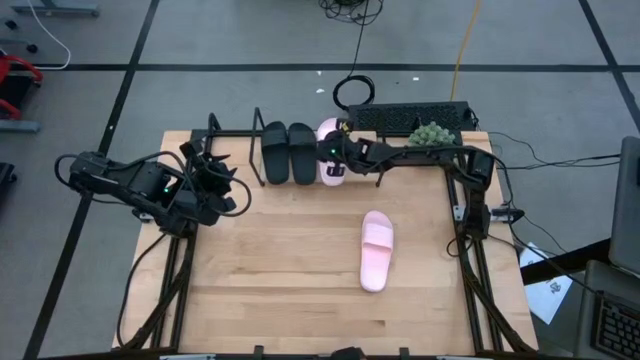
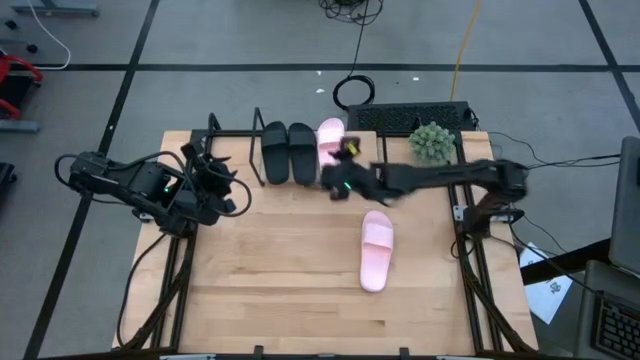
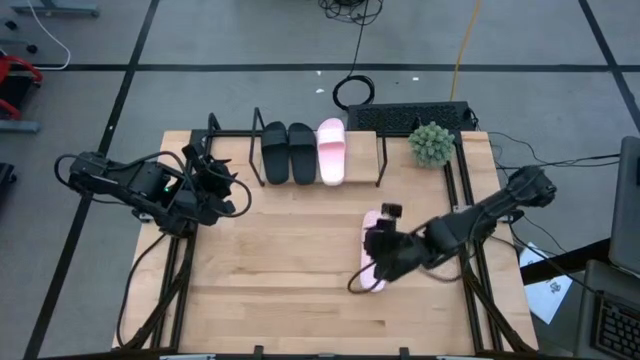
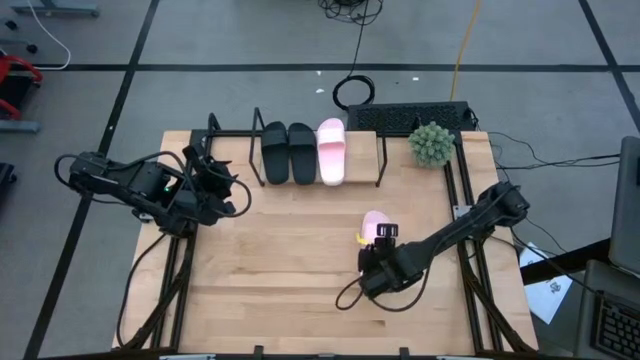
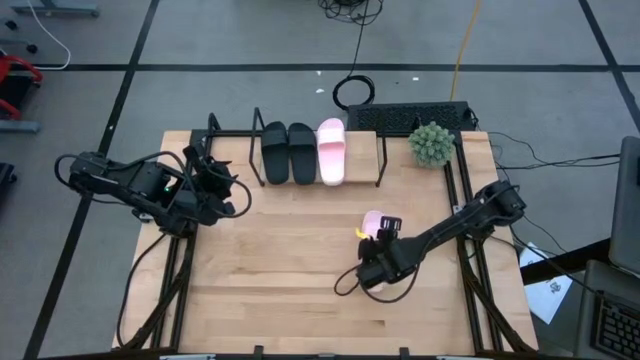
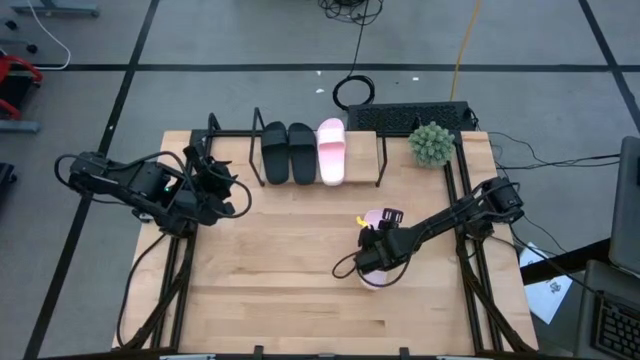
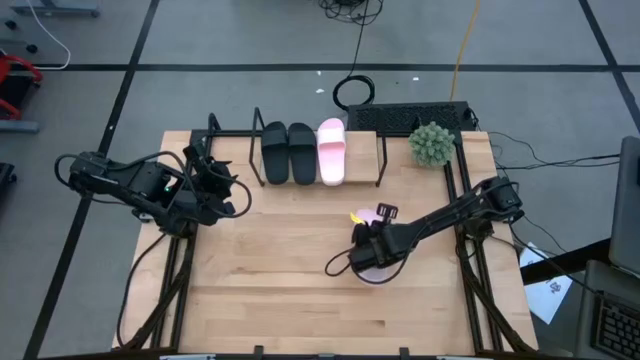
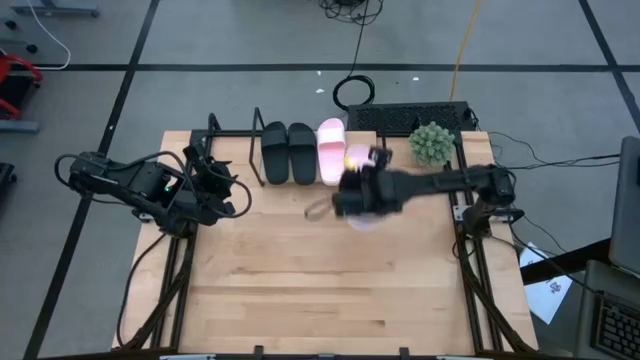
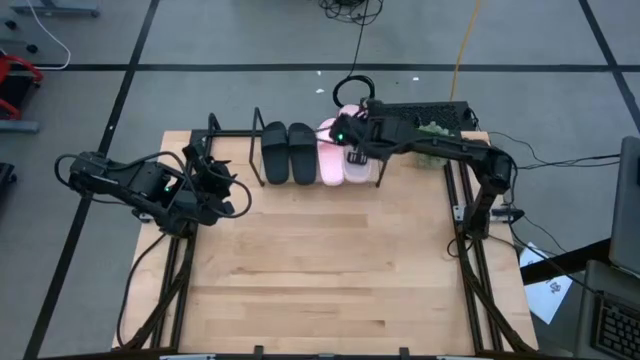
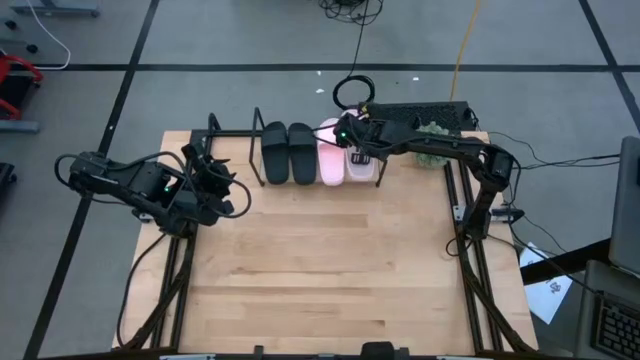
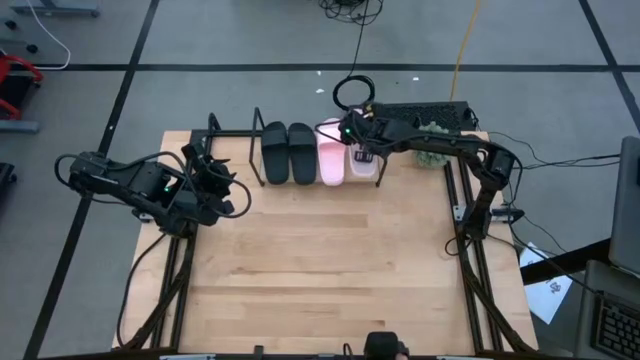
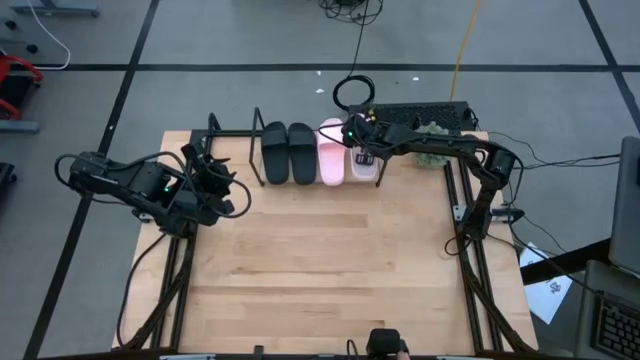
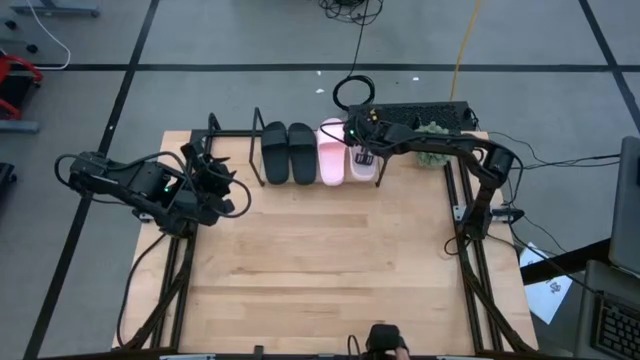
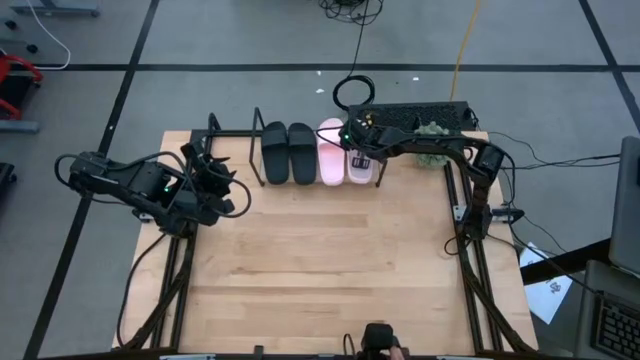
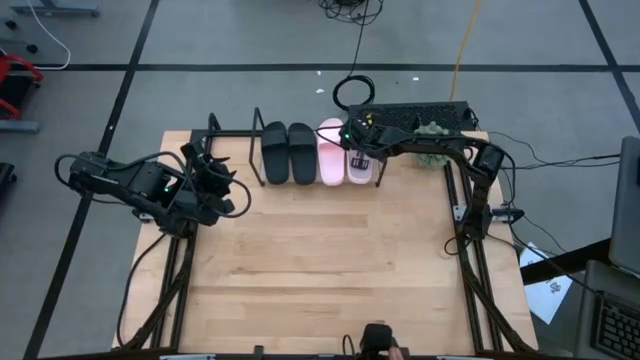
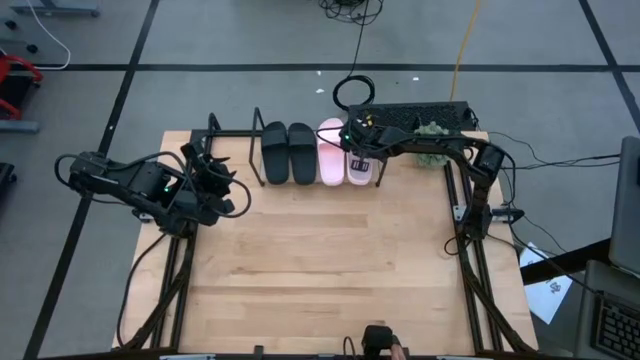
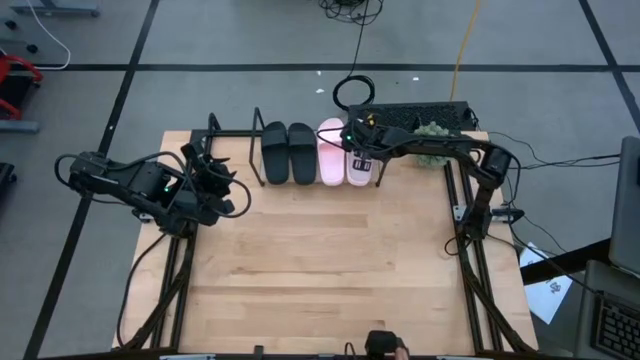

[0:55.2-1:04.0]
Task: Pick and place slides into the shelf
Put the white slide on the shelf

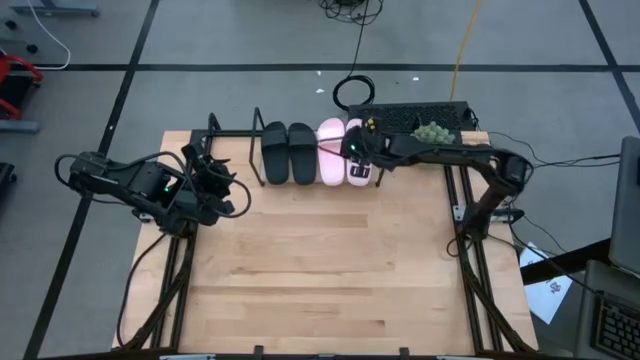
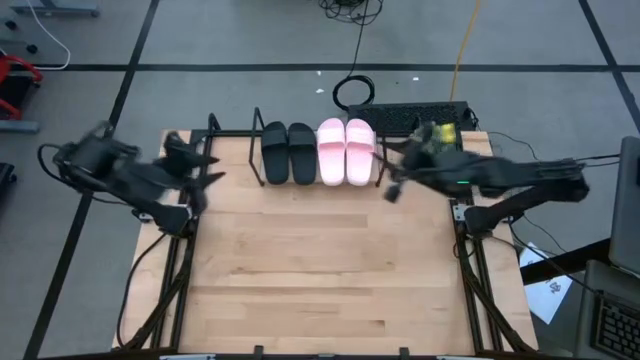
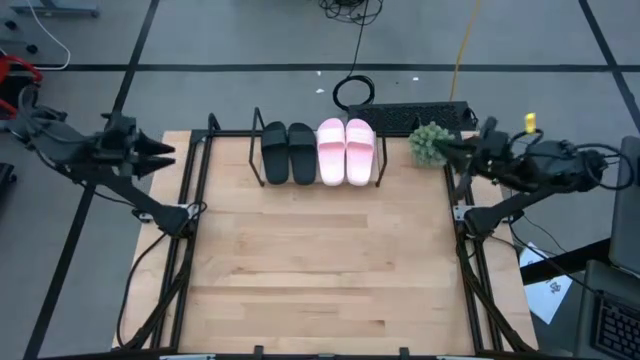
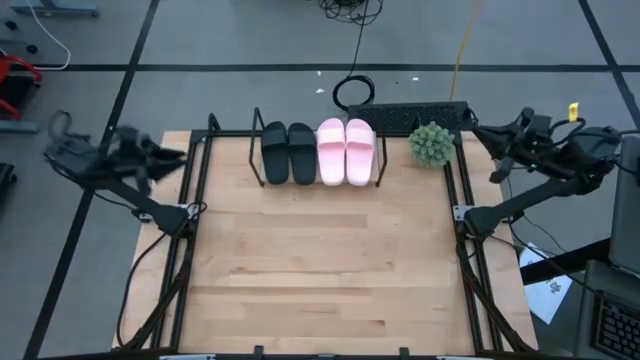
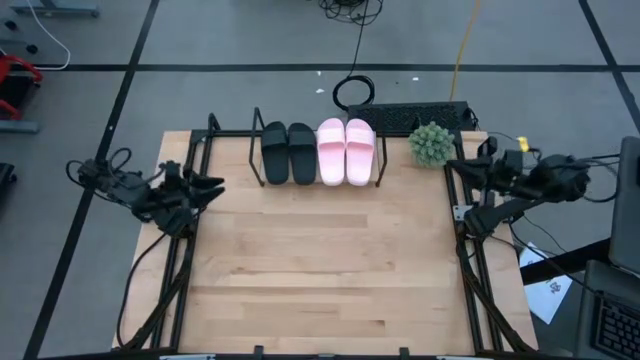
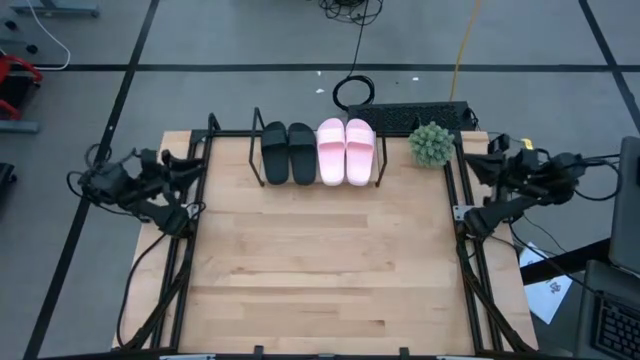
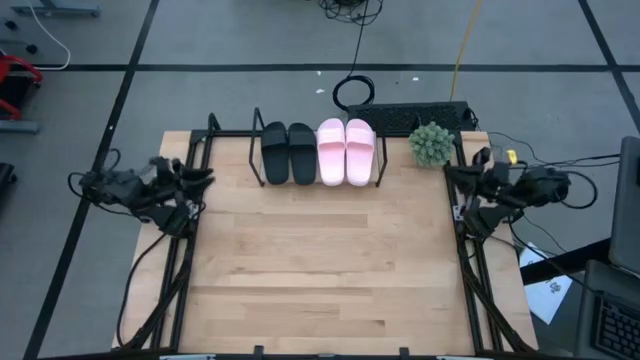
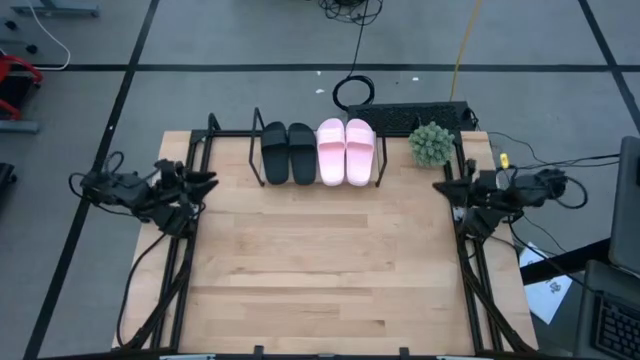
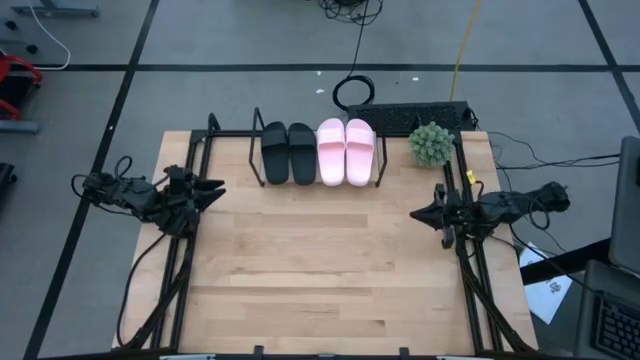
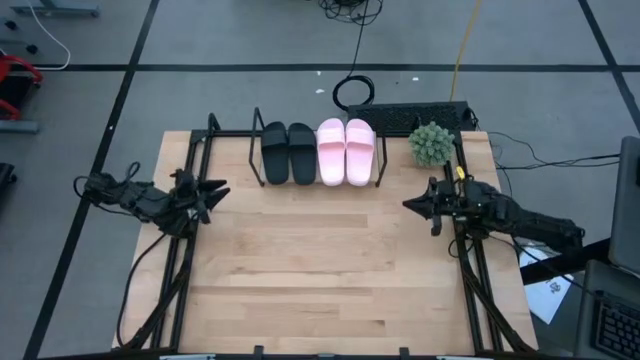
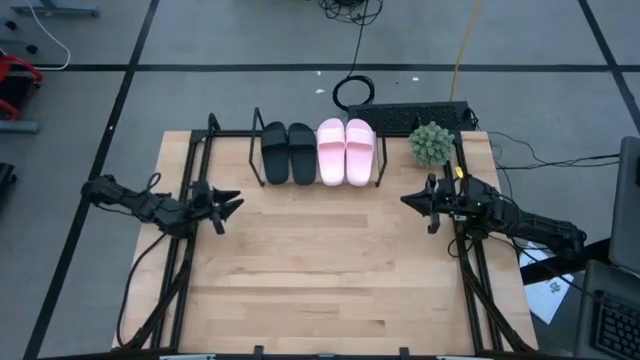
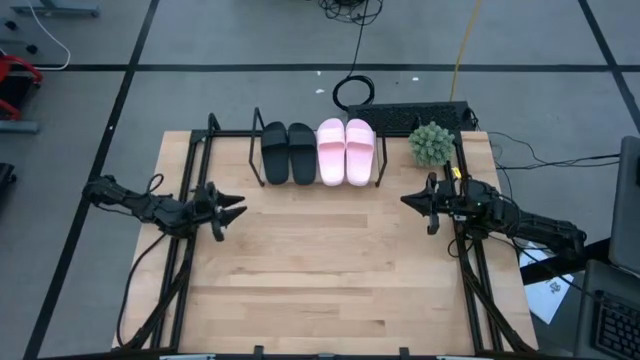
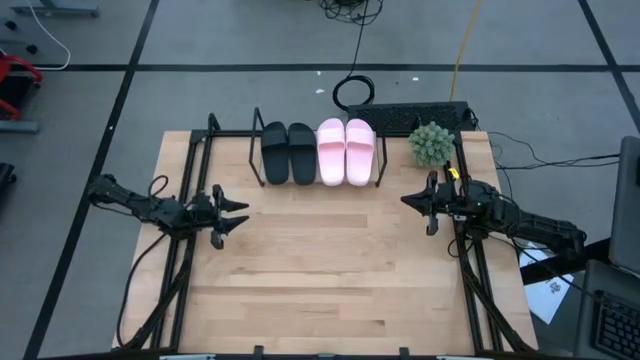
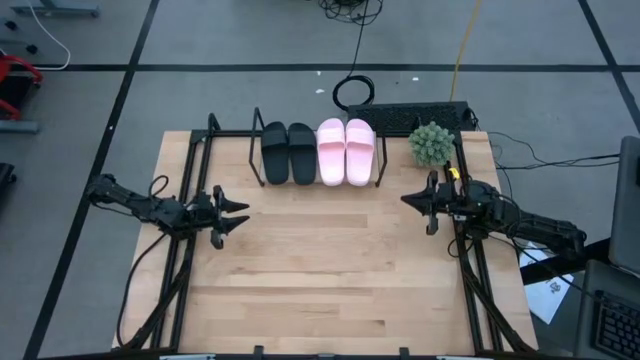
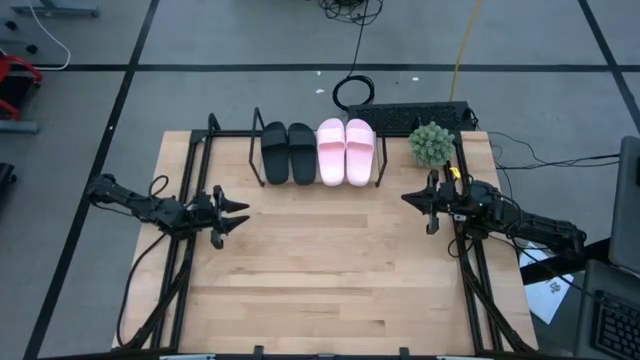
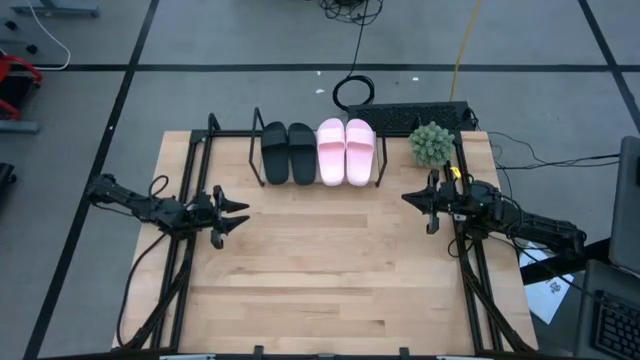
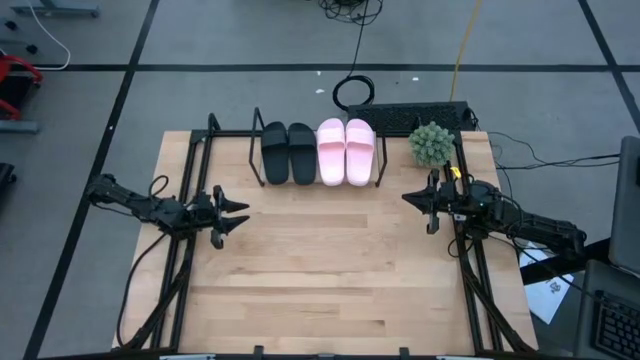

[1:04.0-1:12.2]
Return to Home Position

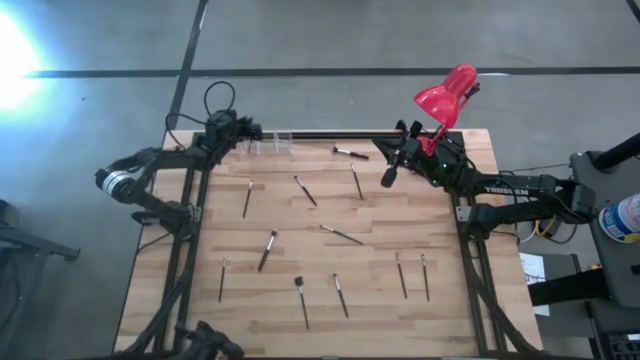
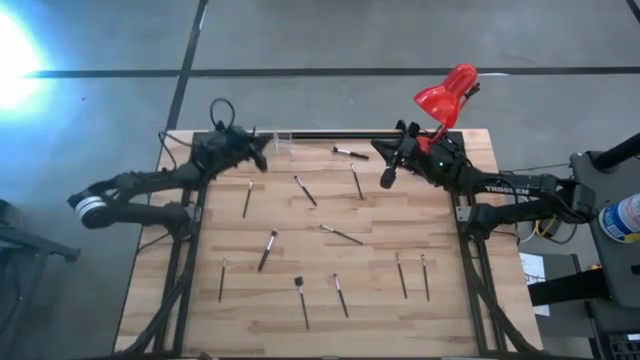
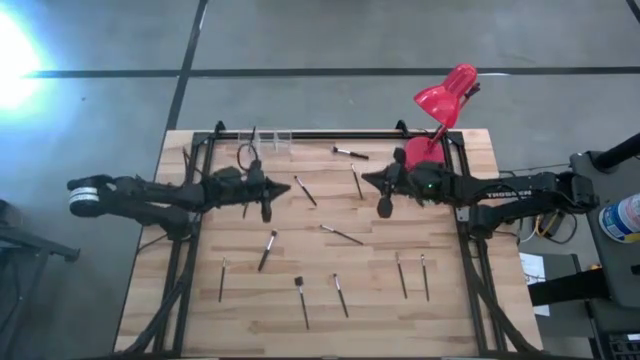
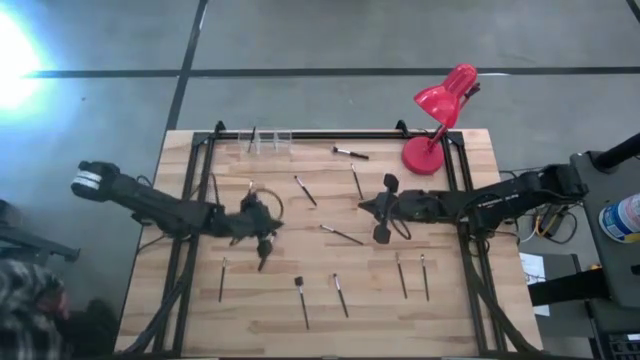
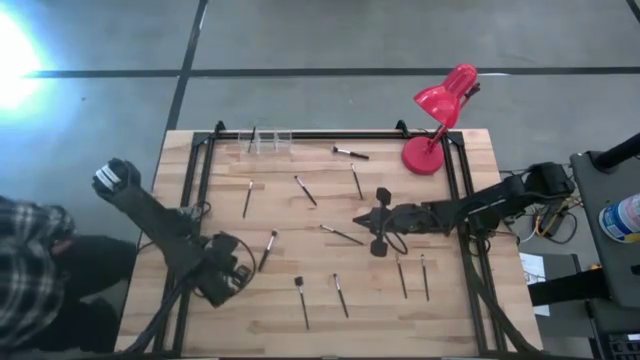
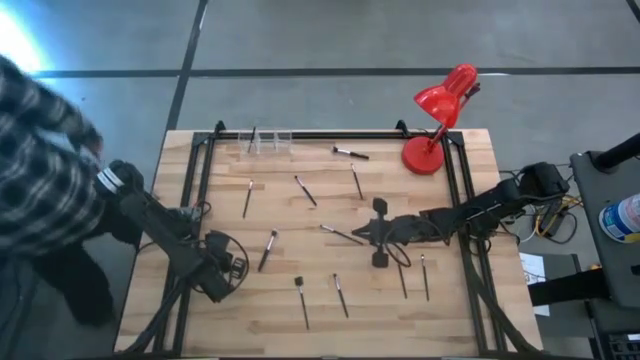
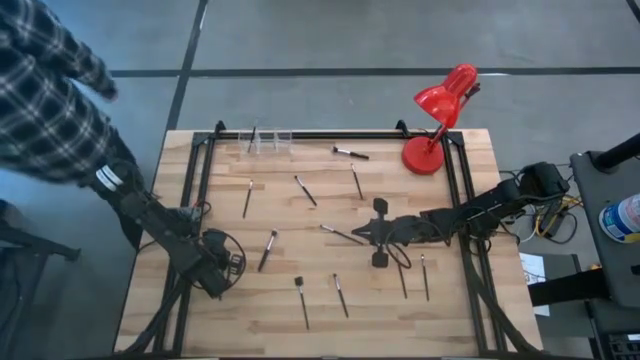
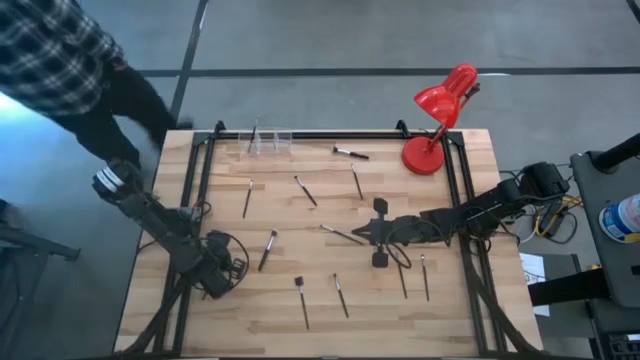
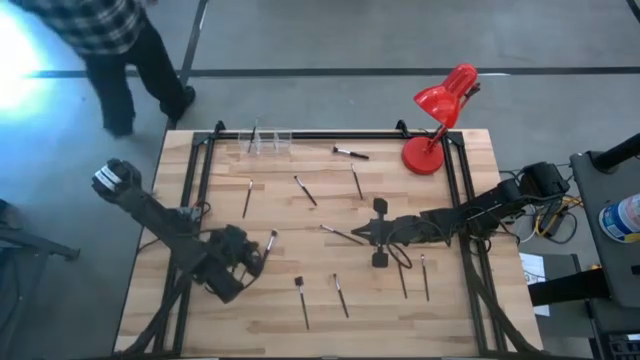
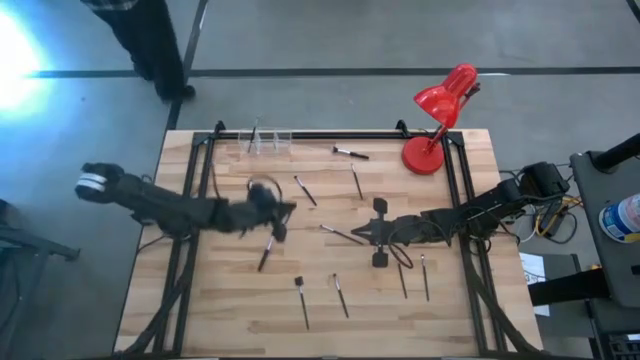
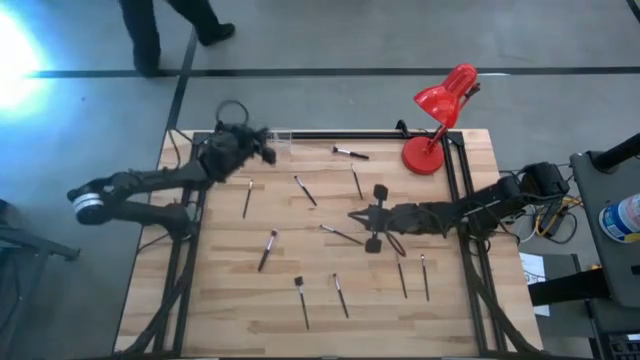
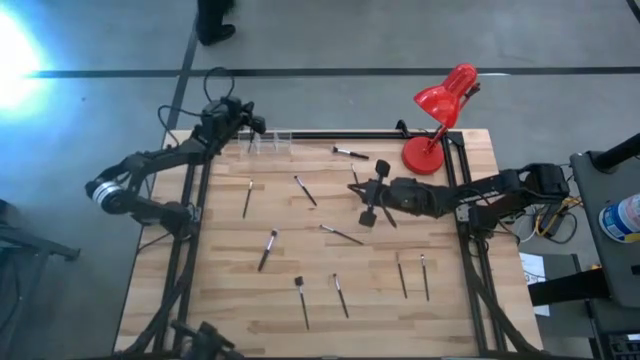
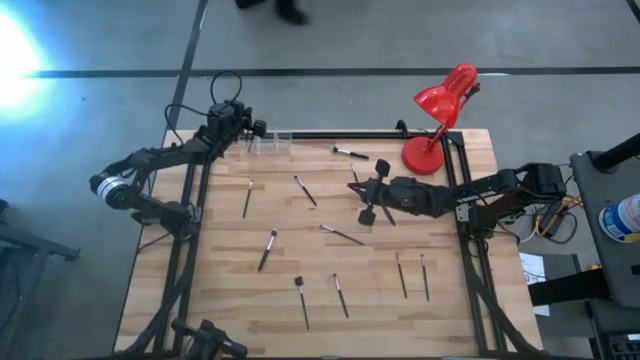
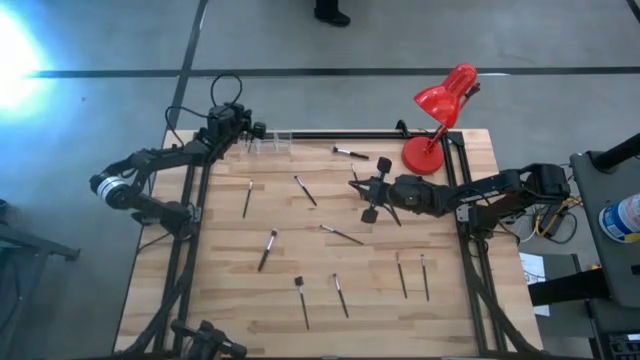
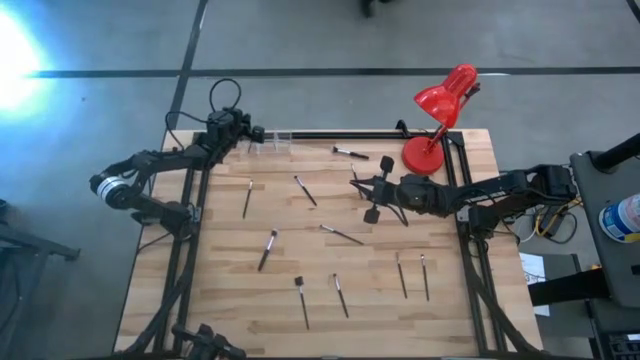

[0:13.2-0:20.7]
Task: Put items in baskets/containers
Put the black eyeshadow brush into the transparent organizer
